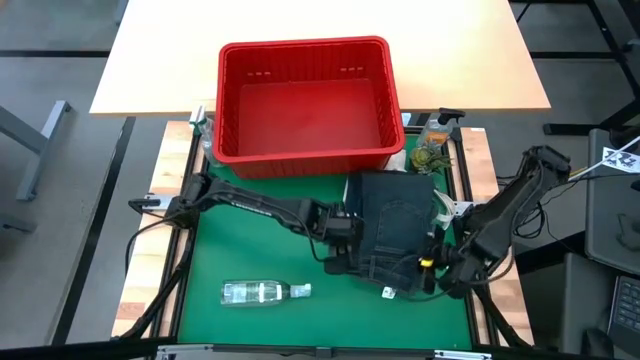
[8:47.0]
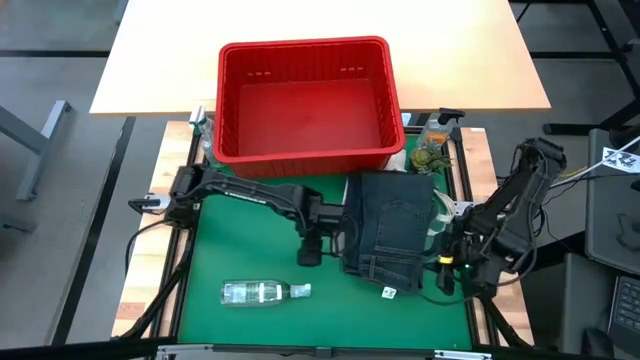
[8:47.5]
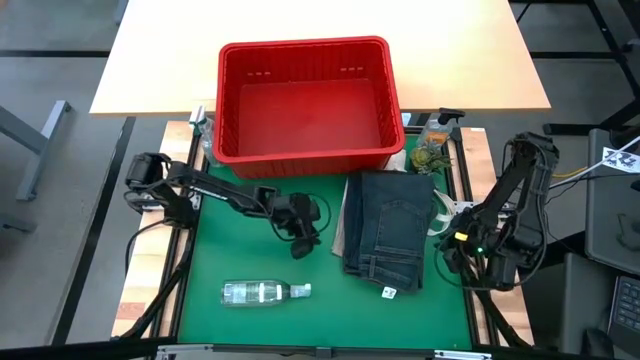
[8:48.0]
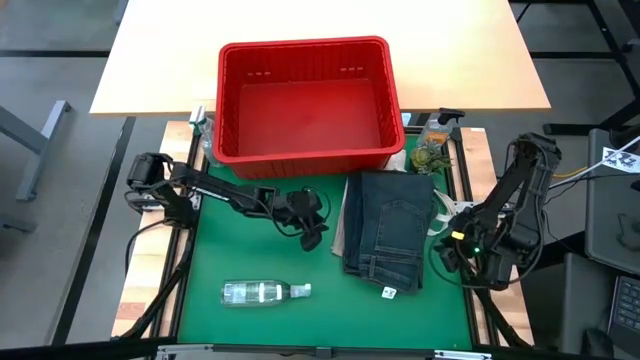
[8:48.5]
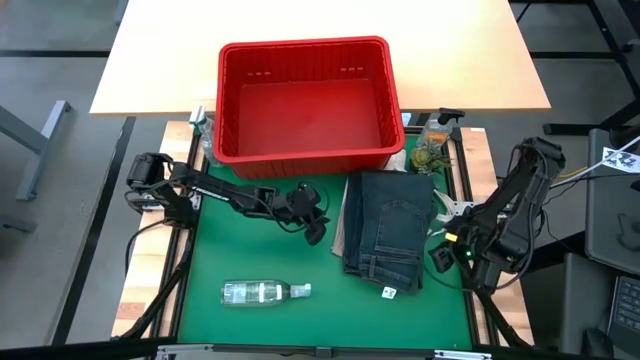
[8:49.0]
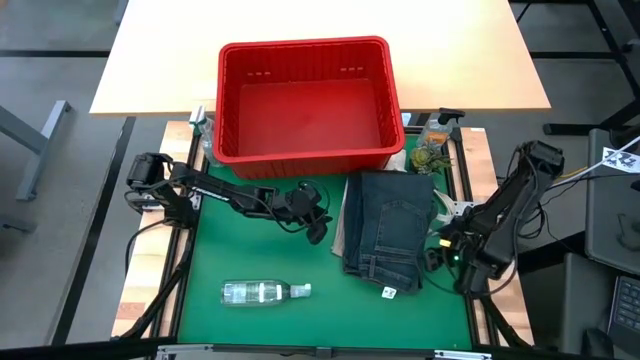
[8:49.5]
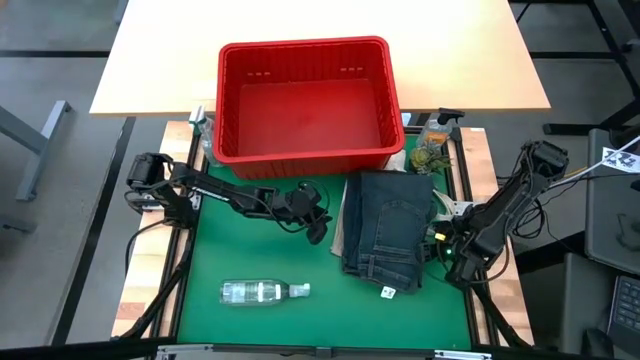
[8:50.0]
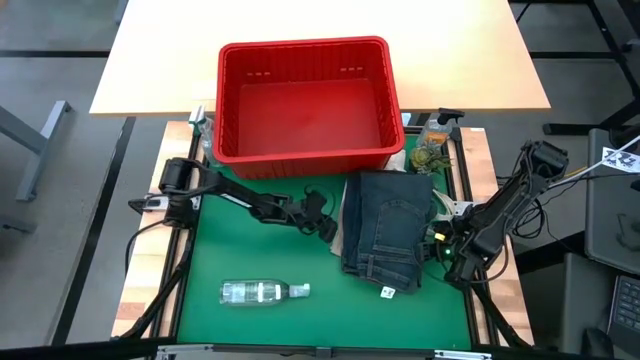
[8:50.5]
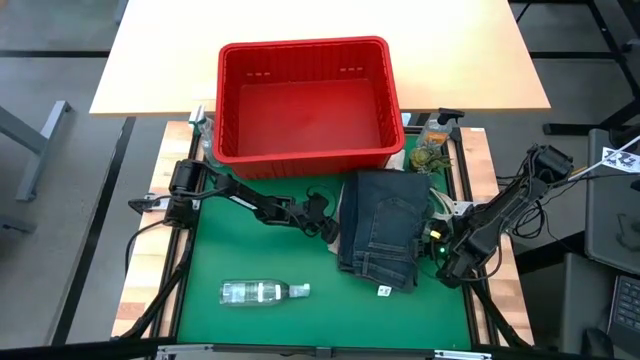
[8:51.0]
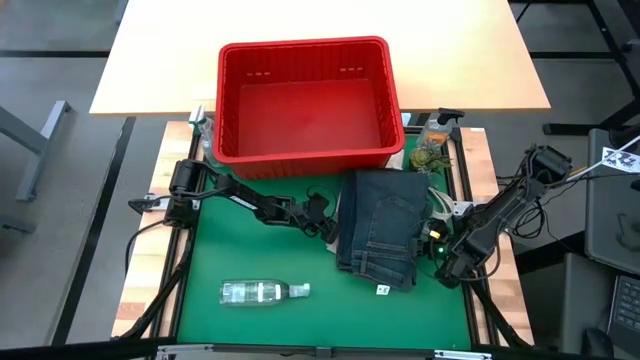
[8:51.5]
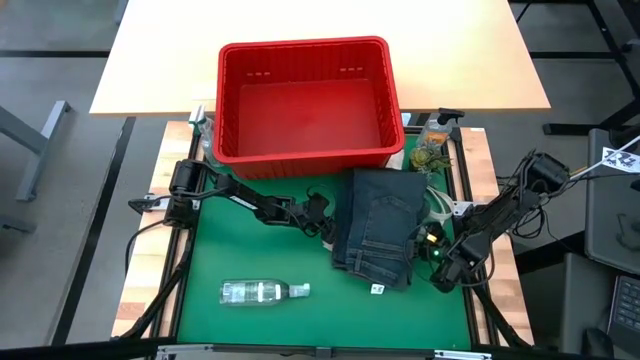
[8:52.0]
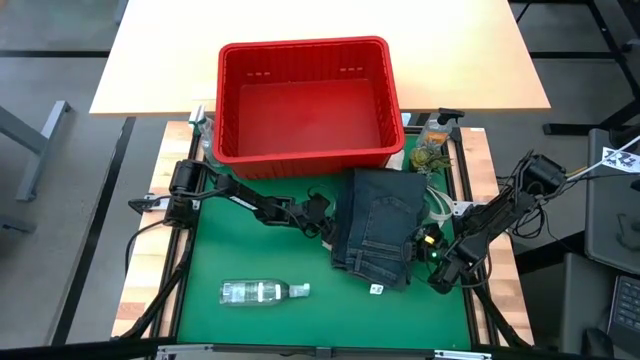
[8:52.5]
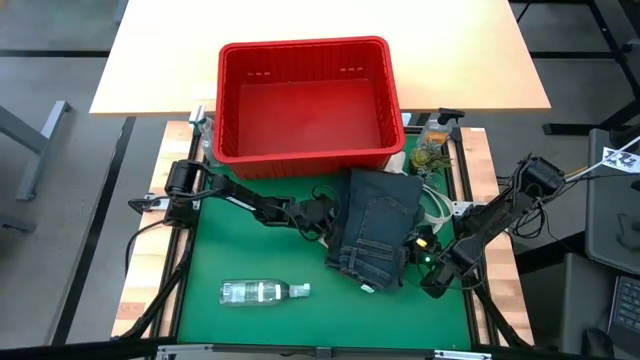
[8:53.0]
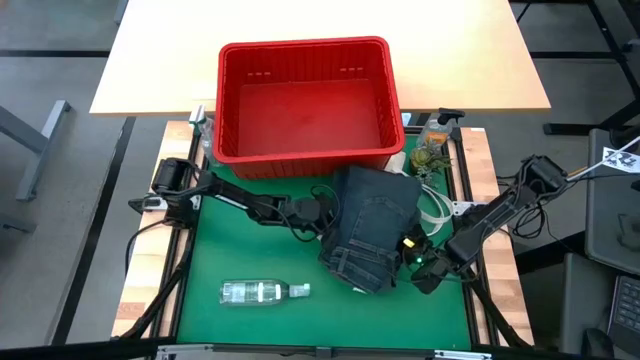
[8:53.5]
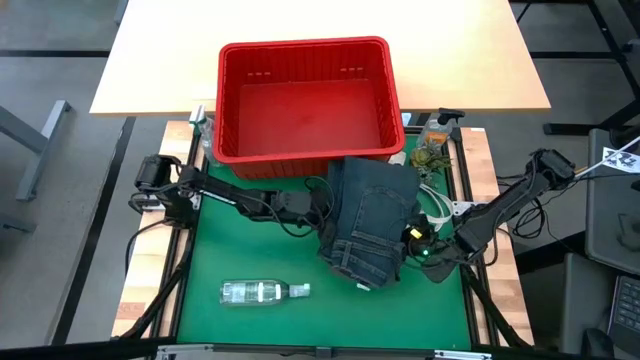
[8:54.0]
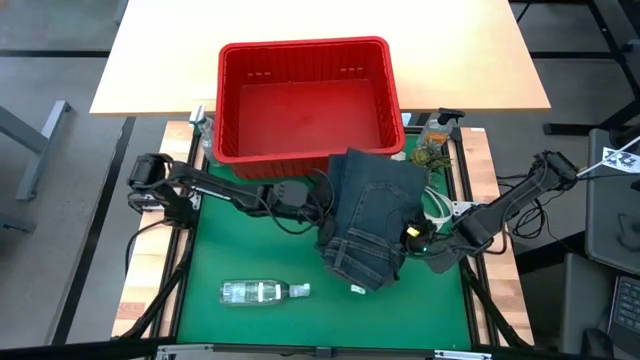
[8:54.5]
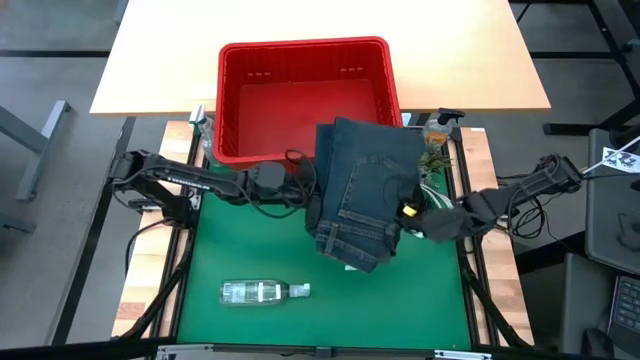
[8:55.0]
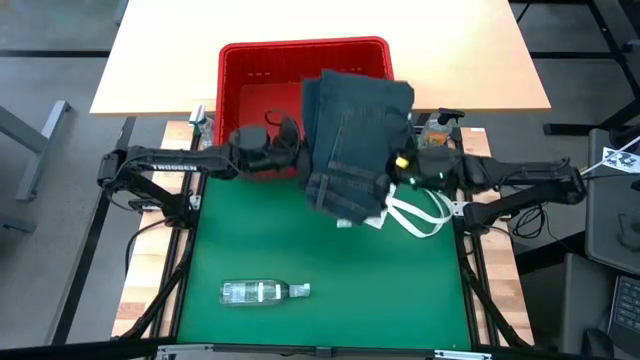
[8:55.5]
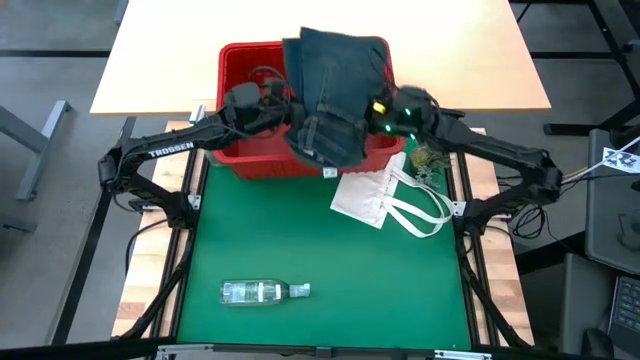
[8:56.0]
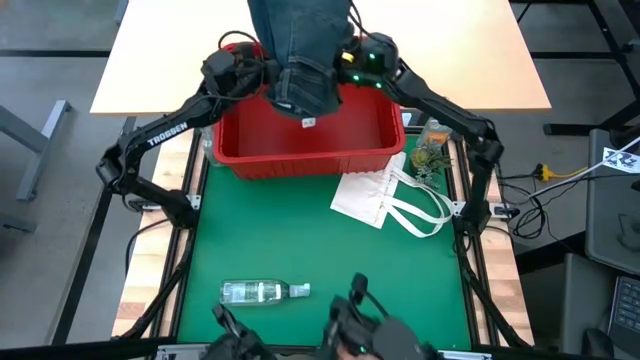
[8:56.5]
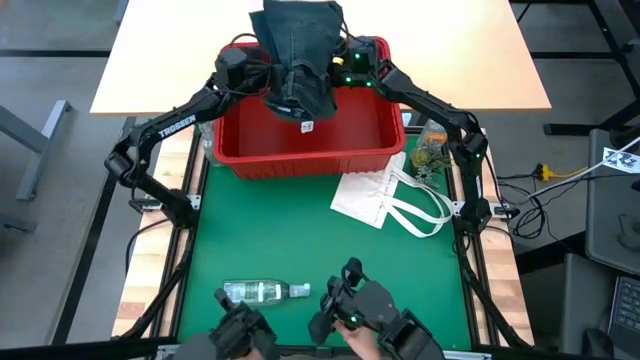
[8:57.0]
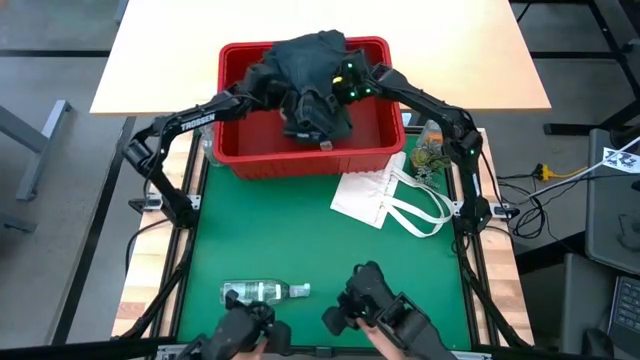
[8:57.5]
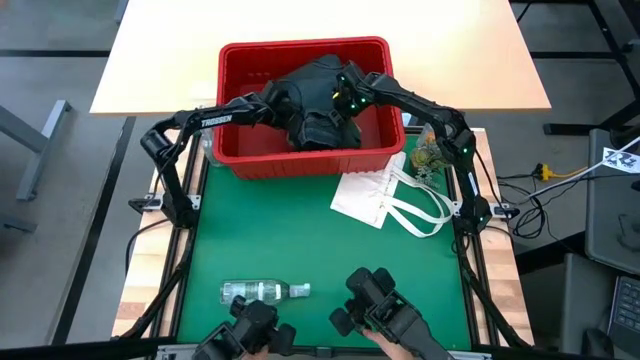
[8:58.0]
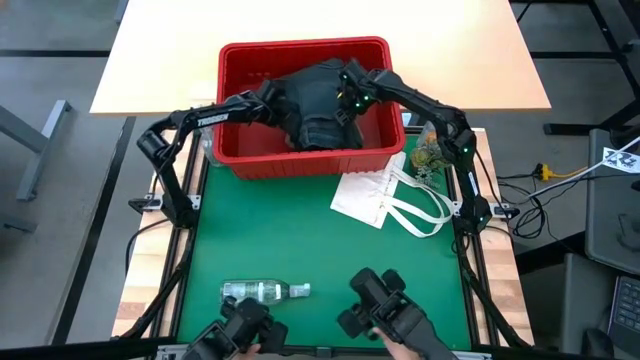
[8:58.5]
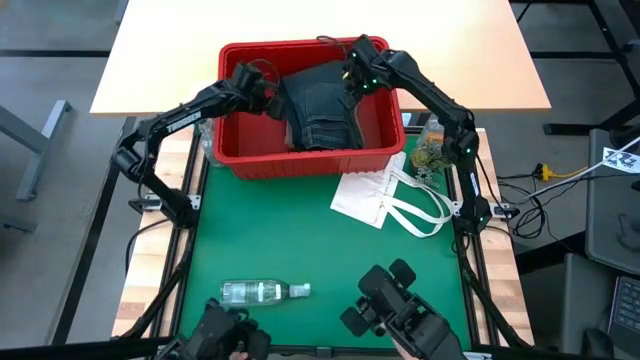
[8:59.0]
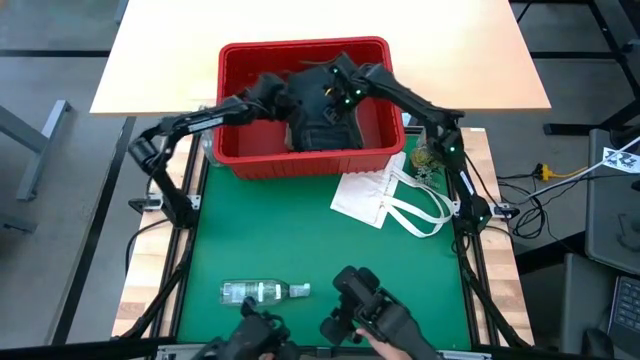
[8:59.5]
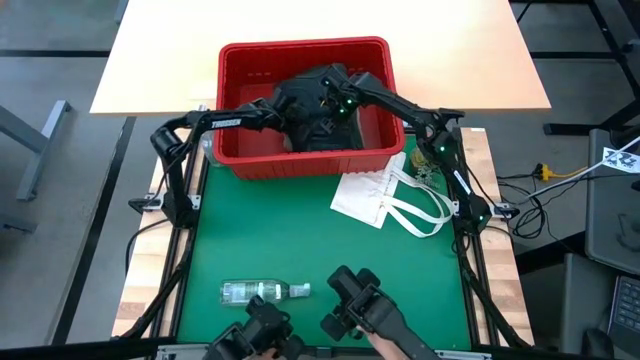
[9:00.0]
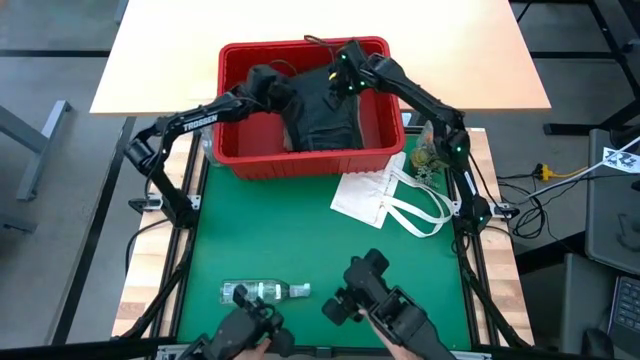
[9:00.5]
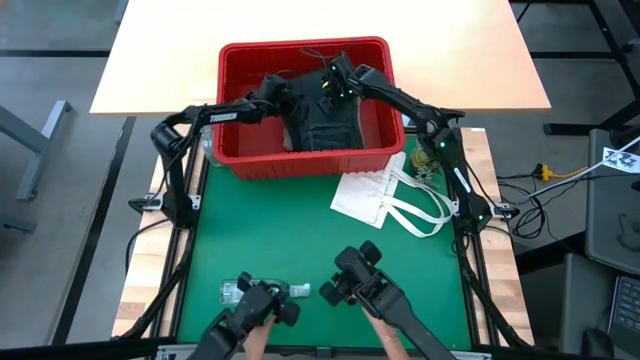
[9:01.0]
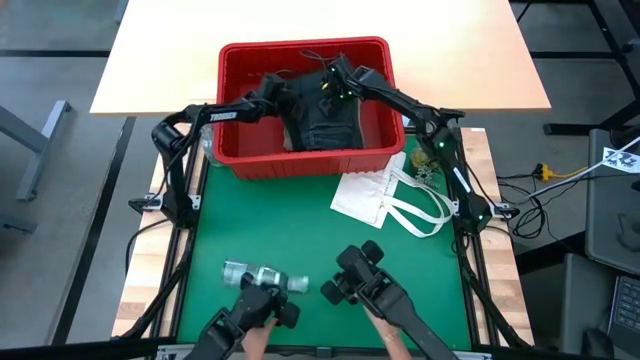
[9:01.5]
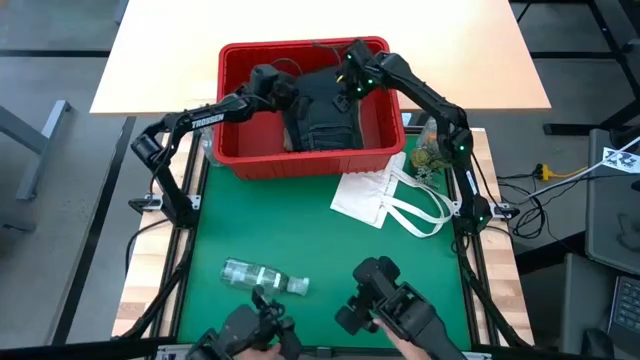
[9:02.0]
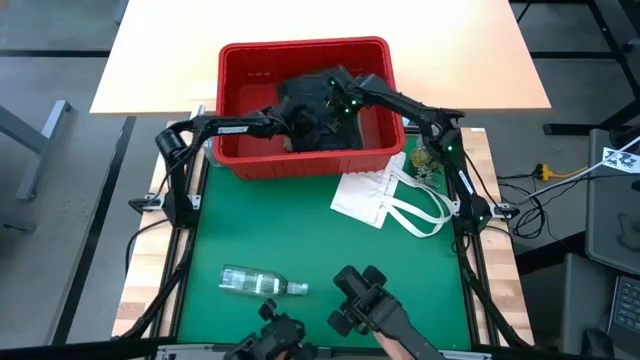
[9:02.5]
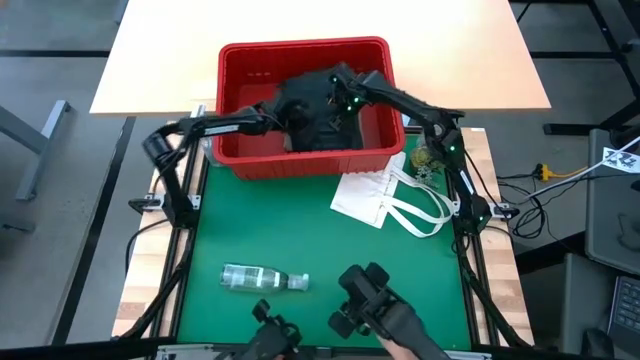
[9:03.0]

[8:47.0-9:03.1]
Task: Fold laundry
Put the stack of folded clothes into the red bin

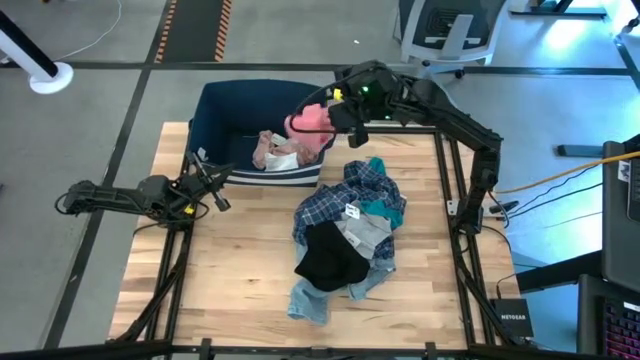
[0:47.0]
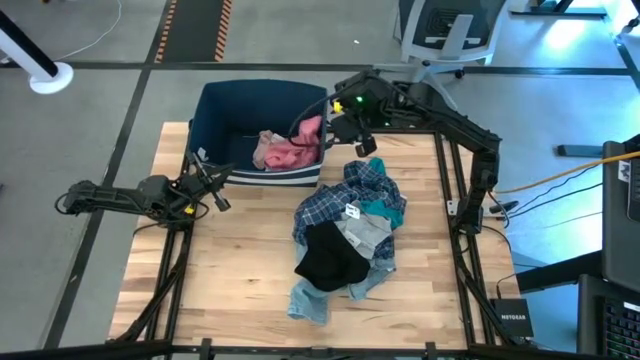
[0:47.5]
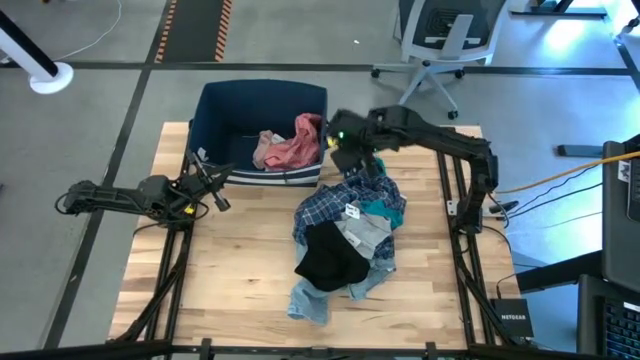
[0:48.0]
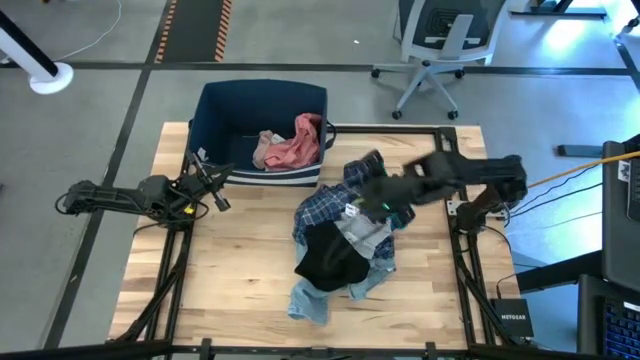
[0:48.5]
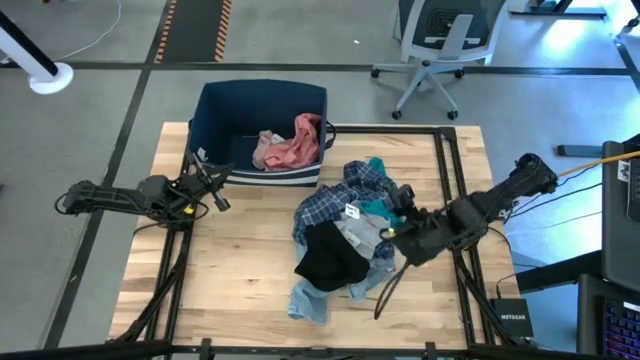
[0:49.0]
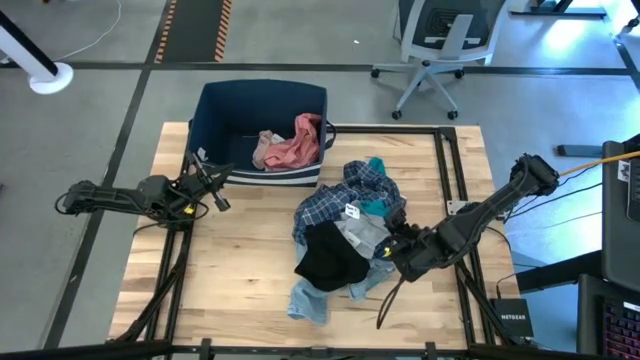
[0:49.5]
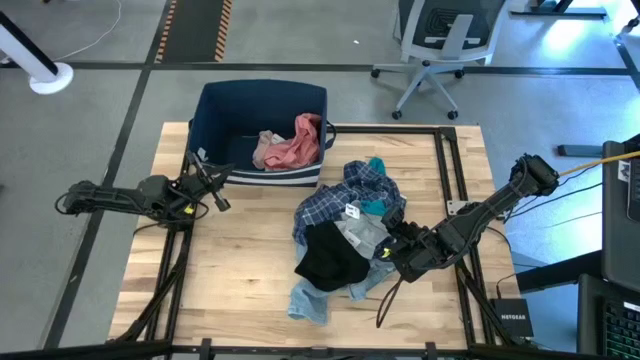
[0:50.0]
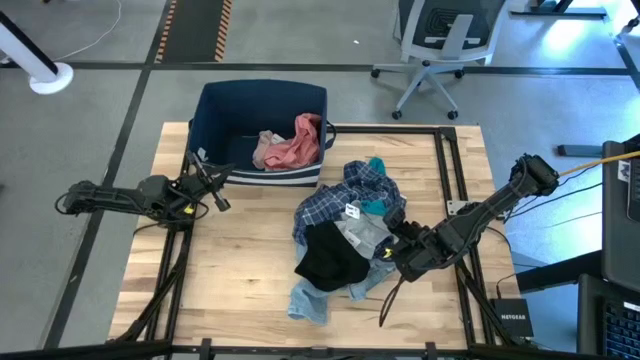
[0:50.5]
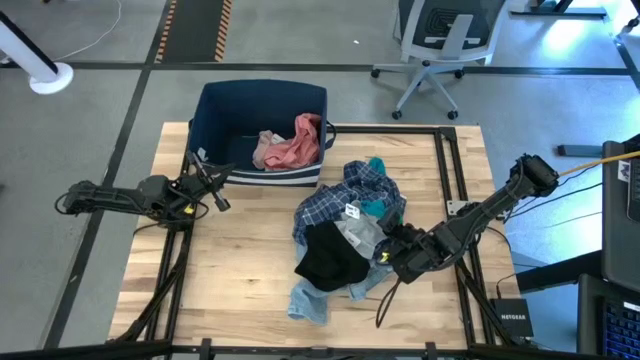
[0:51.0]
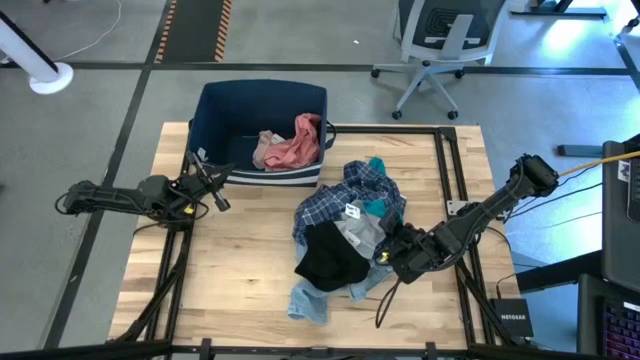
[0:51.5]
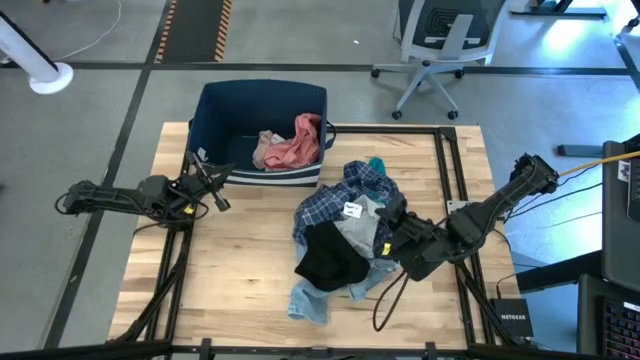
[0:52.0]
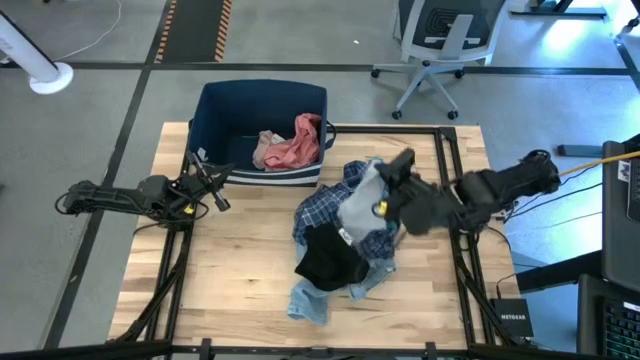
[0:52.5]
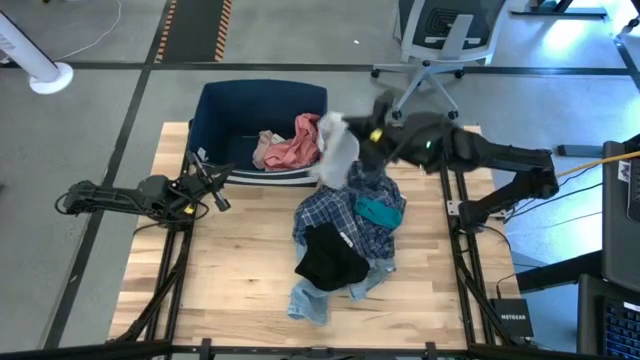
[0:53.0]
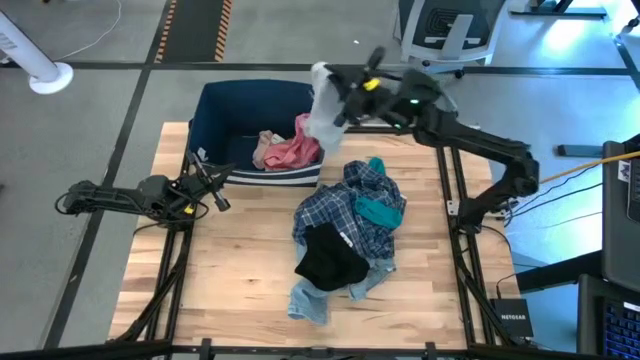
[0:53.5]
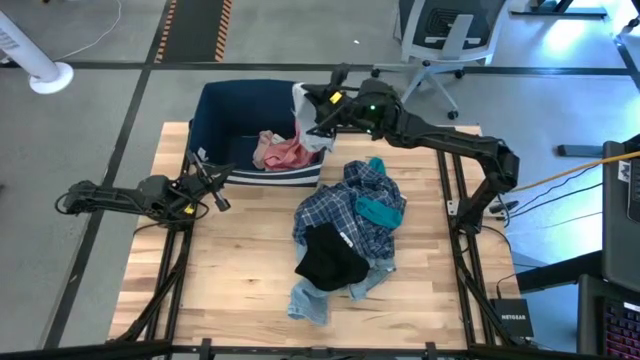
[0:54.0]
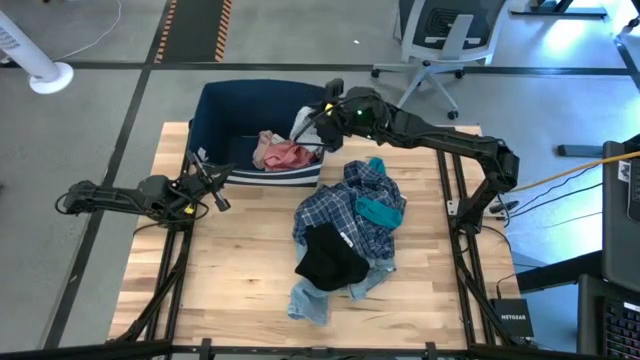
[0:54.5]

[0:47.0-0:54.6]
Task: Sort clothes
Put the gray underwear into the blue laundry bin
